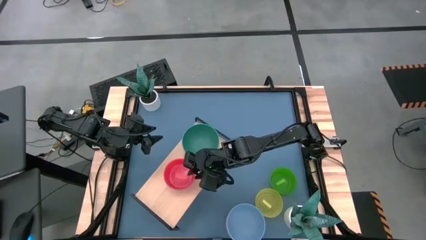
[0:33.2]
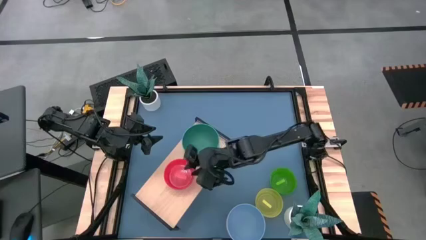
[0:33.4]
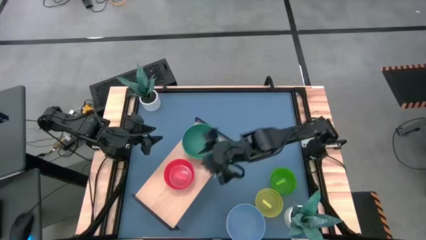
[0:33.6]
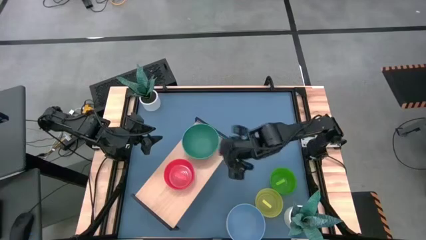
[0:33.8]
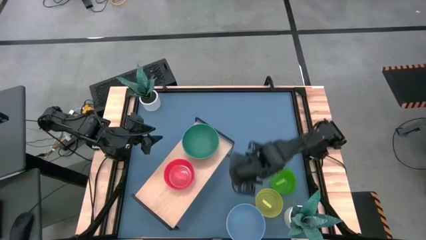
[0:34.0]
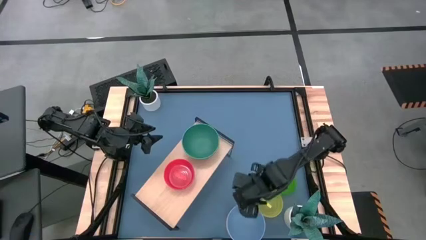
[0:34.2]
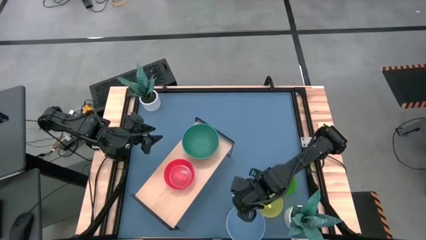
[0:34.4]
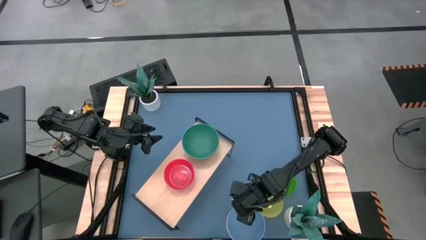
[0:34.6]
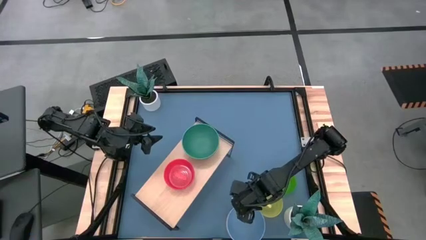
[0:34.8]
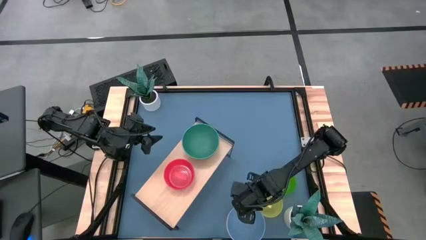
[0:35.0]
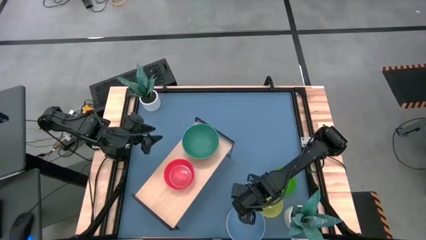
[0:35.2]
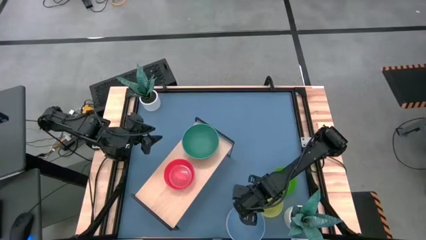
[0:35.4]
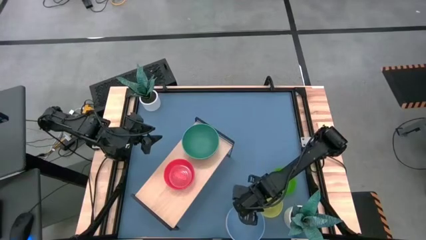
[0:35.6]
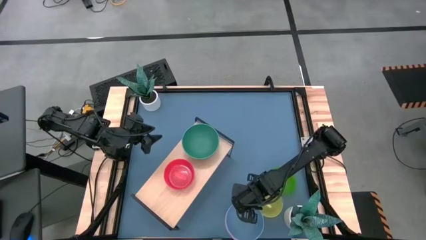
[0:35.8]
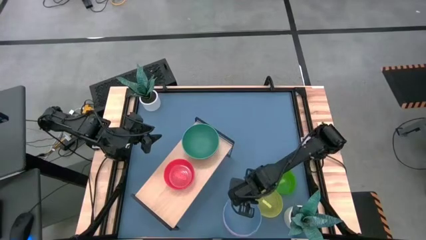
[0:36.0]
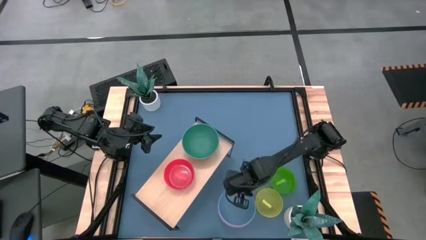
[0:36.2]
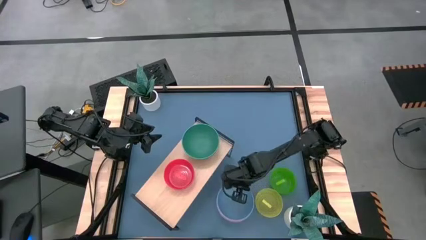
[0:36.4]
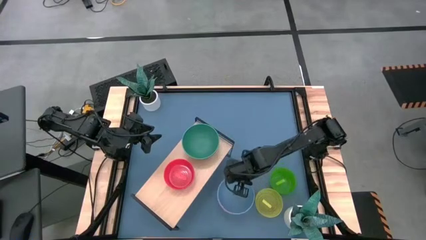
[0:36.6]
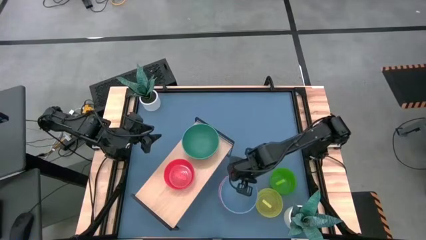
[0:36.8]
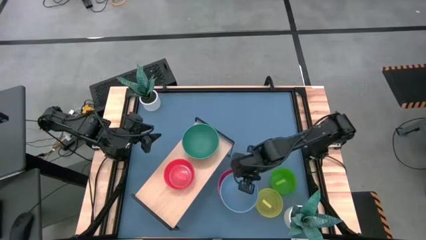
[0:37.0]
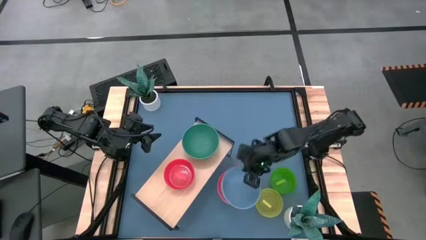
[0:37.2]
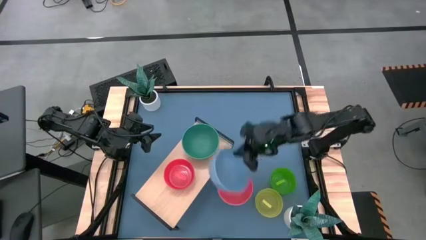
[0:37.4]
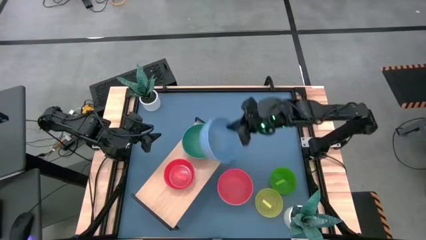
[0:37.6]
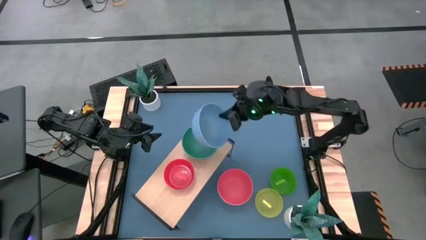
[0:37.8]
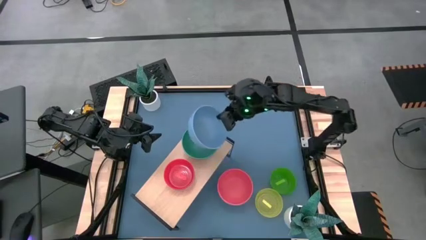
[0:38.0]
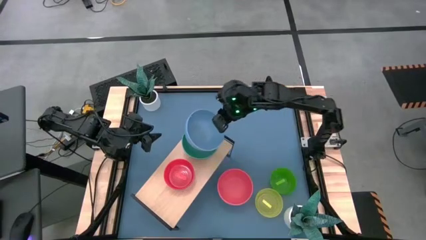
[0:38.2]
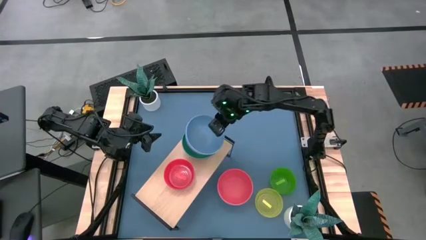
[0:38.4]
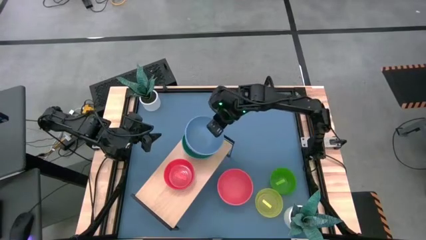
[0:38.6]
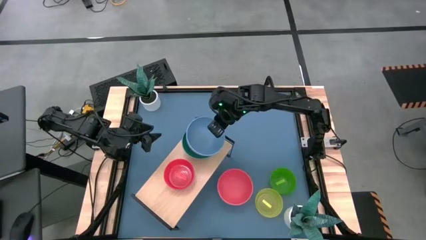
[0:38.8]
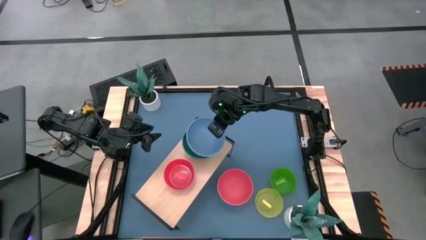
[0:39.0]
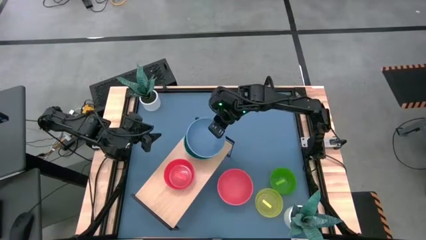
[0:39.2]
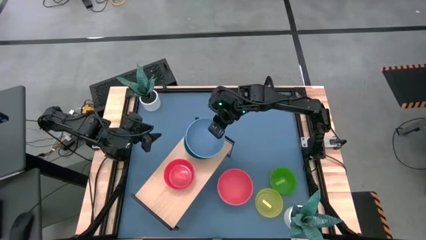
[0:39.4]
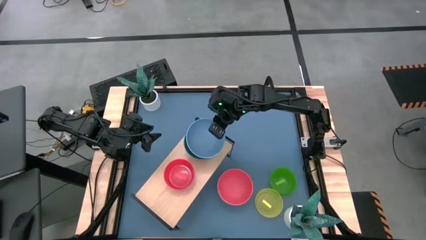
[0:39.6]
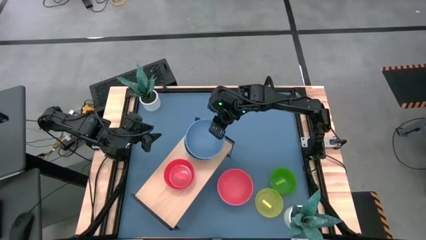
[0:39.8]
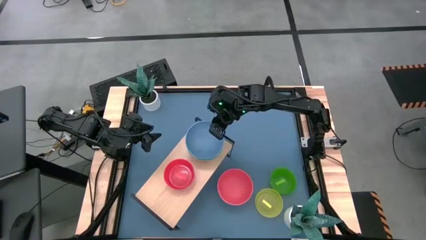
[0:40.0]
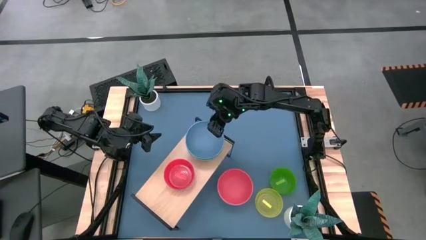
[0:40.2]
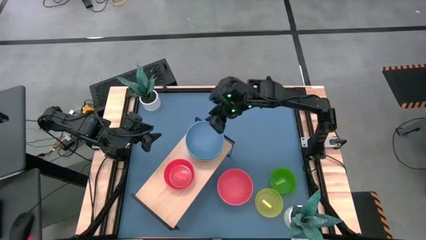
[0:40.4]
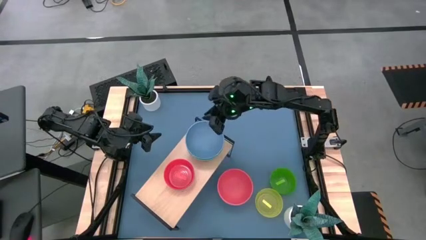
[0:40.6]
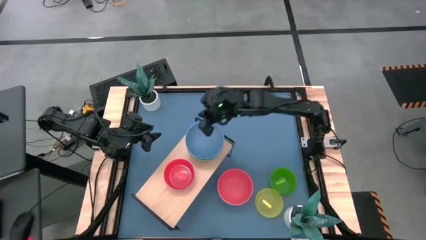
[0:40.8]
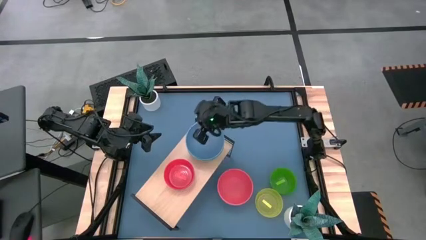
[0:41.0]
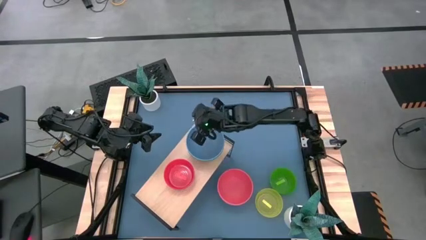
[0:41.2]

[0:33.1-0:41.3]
Task: Place and stack bowls onto a shelf
Stack the blue bowl on top of the green bowl on the shelf

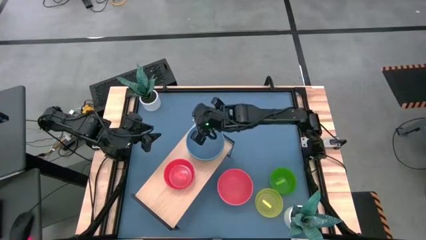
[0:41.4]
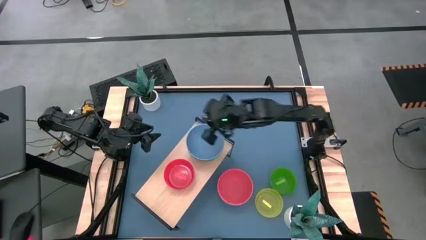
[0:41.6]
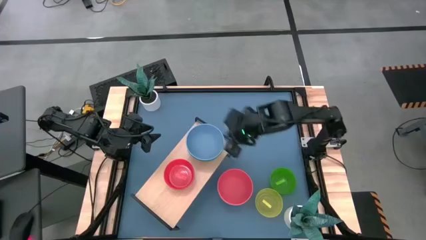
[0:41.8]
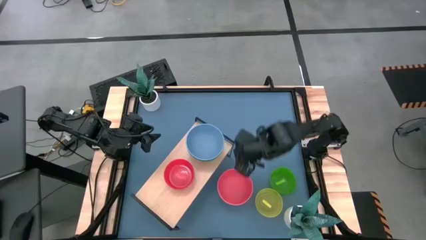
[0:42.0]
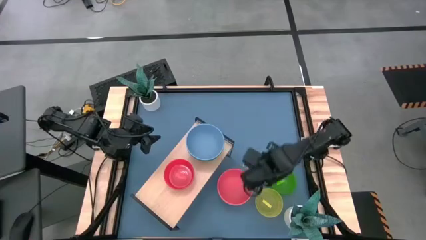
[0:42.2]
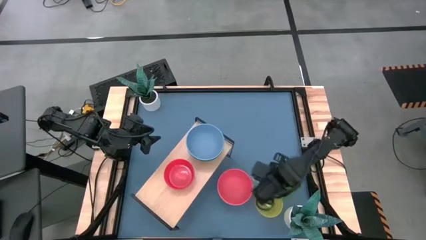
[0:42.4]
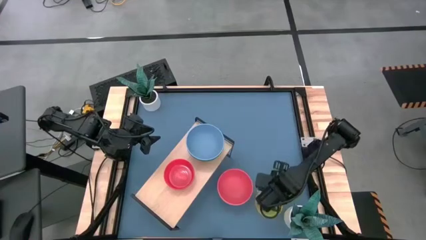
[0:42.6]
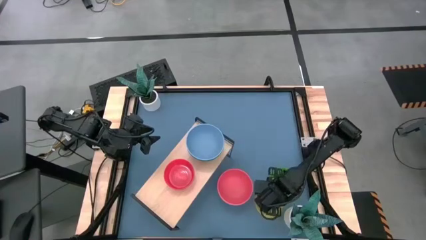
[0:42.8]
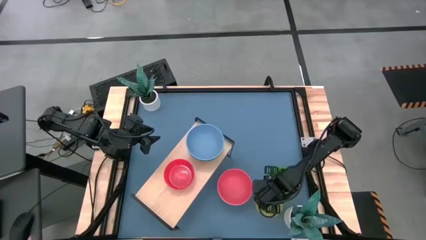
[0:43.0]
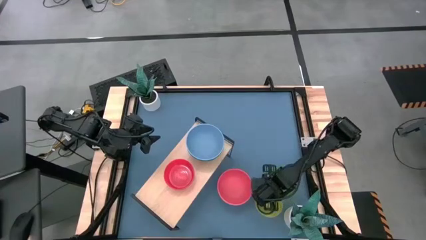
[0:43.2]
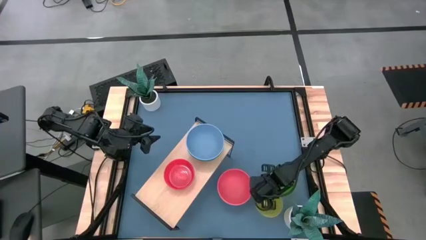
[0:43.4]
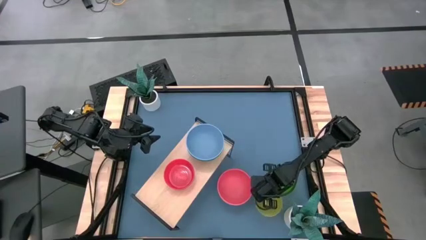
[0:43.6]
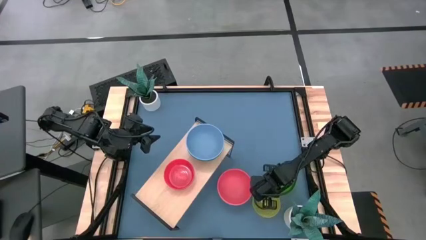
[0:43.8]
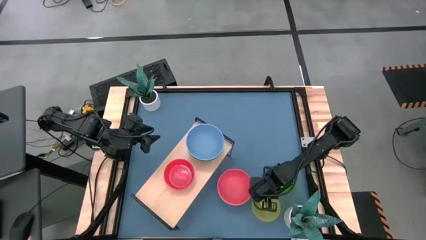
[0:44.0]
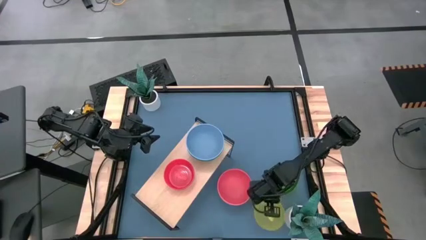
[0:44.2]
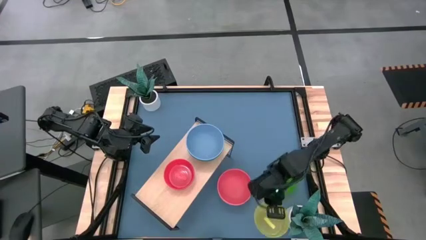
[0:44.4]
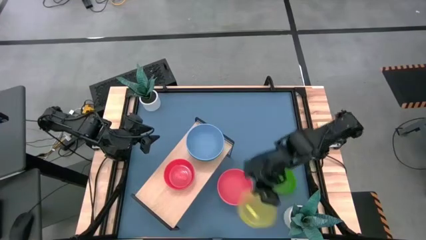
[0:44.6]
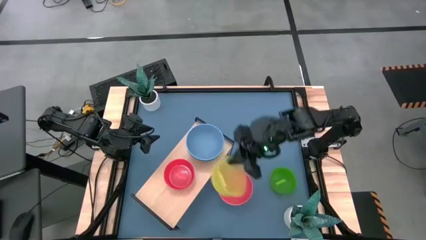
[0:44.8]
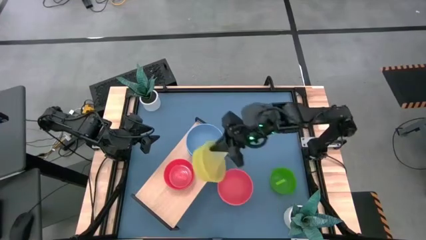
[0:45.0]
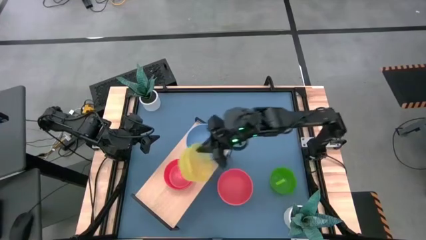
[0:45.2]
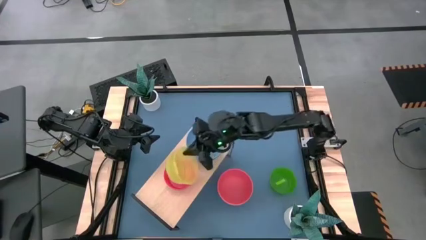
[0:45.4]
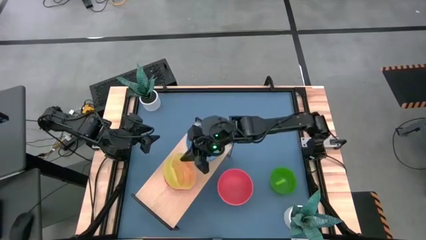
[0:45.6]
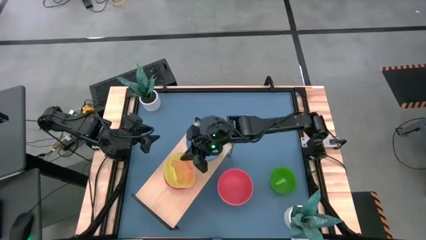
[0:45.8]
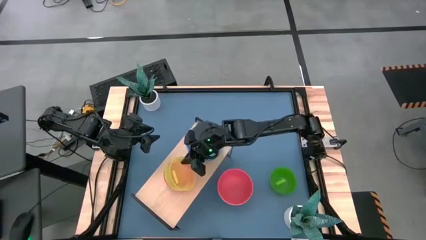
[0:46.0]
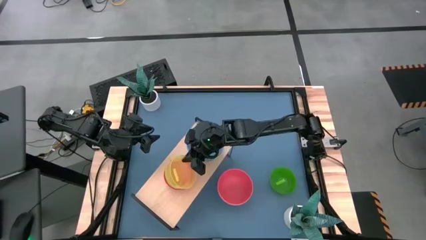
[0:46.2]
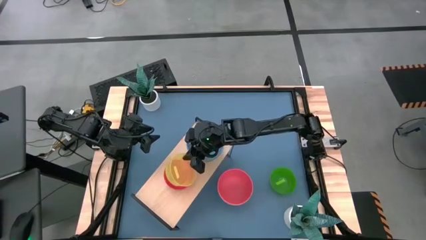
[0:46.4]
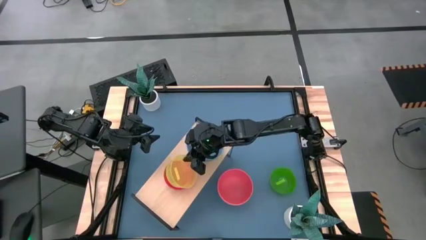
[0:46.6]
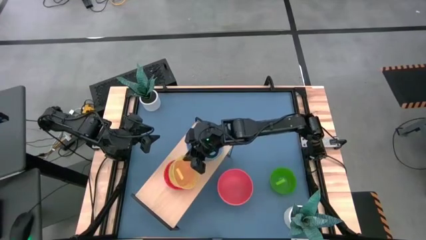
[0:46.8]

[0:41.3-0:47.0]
Stack the light yellow bowl on top of the light orange bowl on the shelf

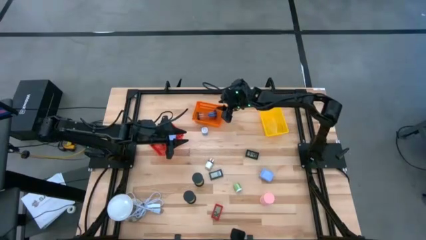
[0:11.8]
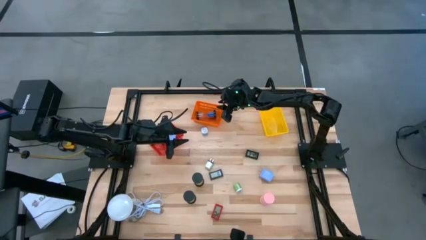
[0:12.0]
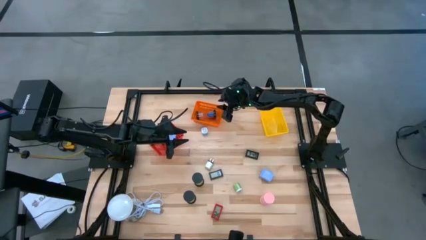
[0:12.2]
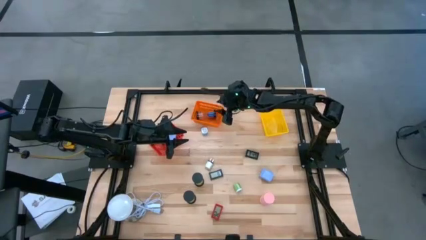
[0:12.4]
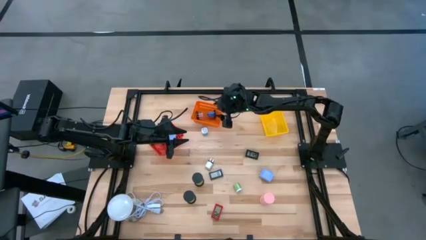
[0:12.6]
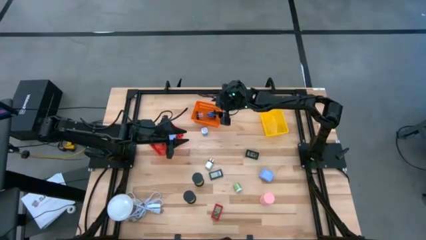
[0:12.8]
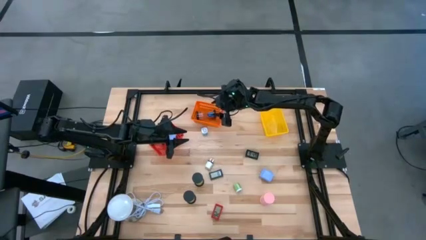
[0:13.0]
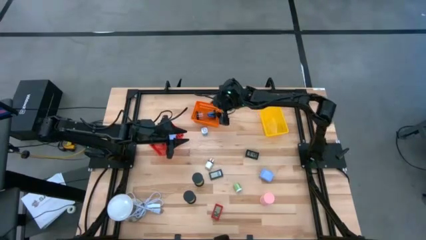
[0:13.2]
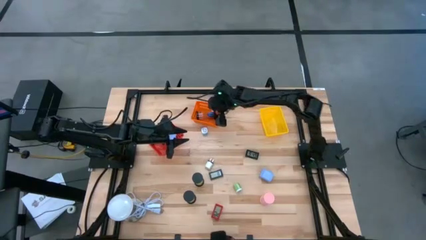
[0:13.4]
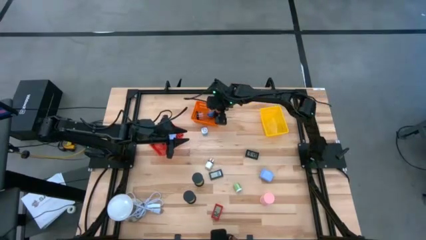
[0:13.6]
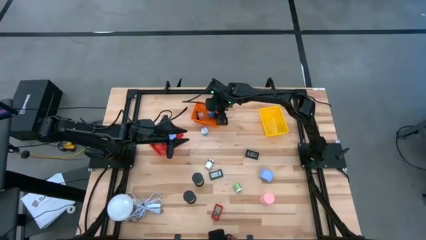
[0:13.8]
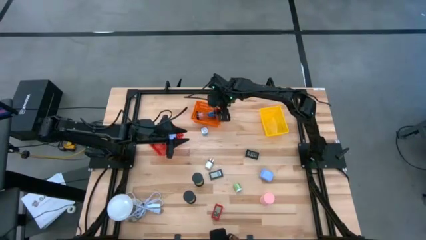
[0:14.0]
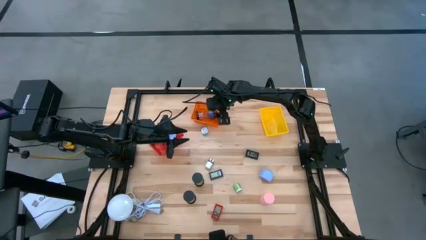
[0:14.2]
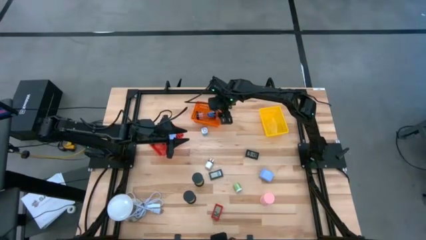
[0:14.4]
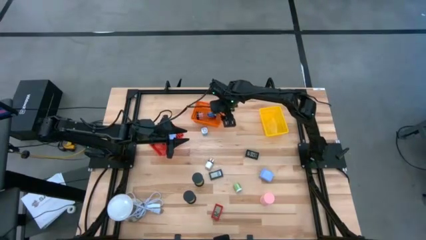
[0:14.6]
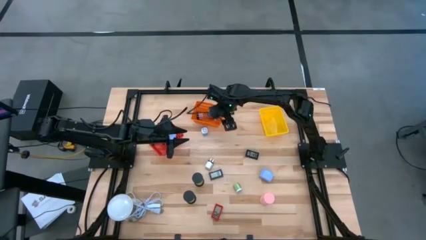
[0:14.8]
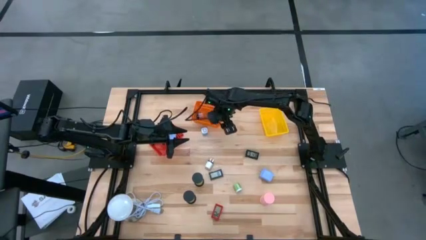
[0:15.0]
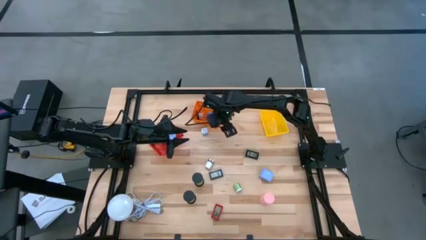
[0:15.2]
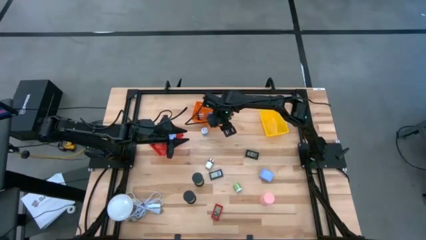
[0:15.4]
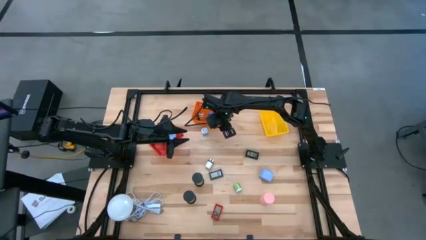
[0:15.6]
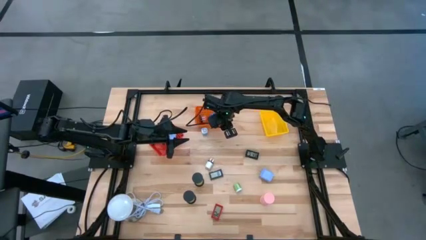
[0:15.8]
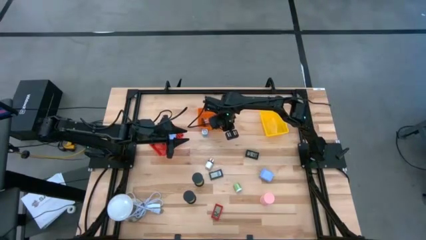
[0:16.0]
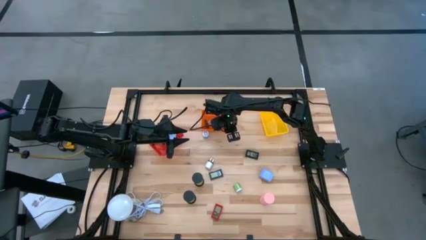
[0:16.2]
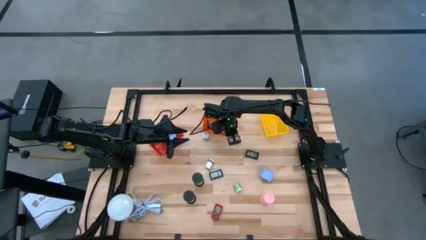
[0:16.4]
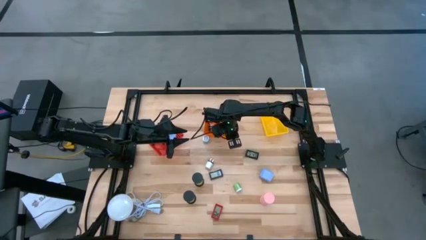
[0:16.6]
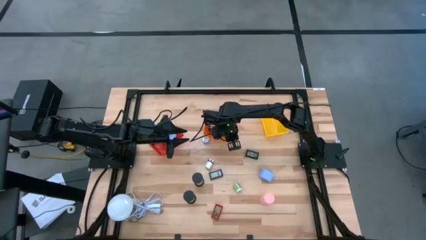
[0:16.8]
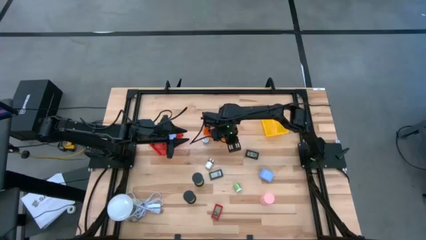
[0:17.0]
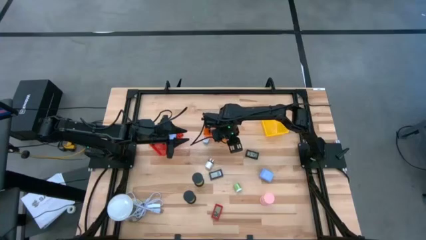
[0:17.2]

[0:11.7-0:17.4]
Task: Pick & Place Office items
Adjust the orange basket
